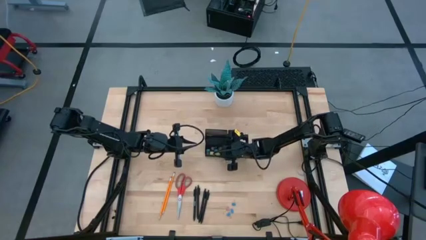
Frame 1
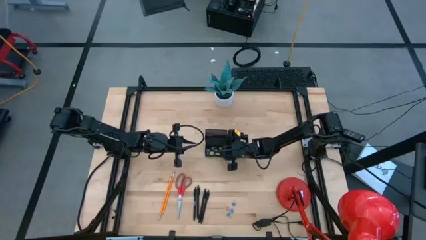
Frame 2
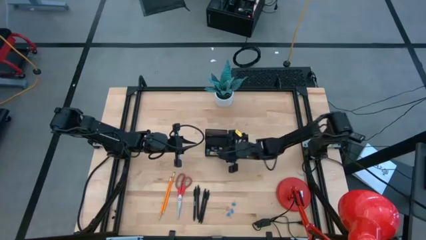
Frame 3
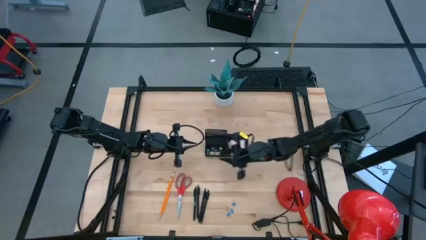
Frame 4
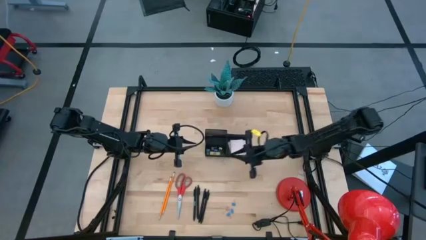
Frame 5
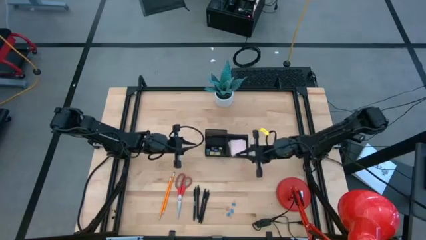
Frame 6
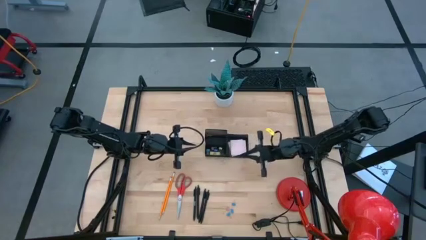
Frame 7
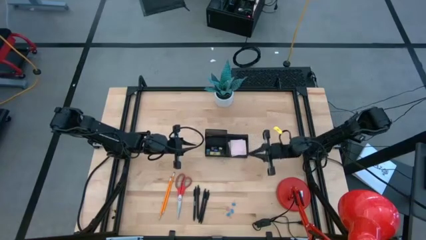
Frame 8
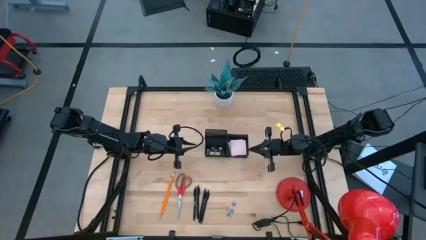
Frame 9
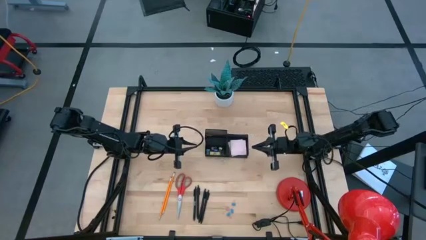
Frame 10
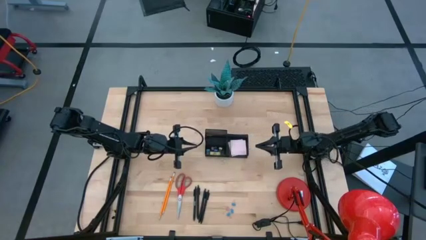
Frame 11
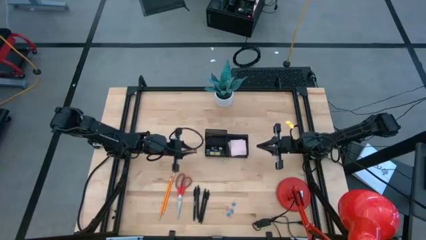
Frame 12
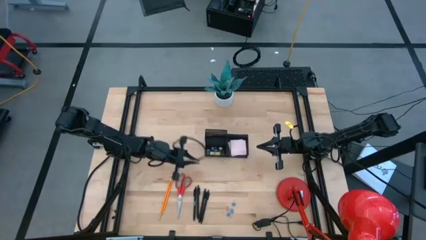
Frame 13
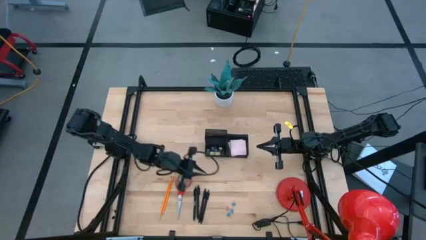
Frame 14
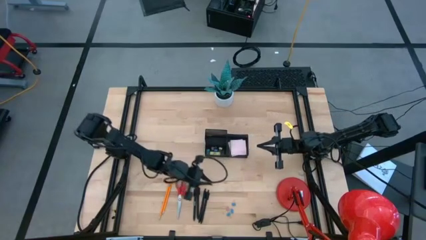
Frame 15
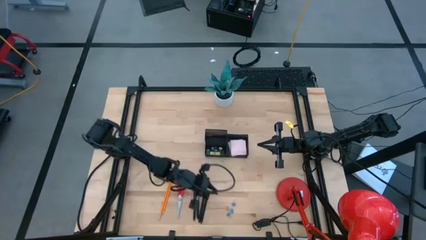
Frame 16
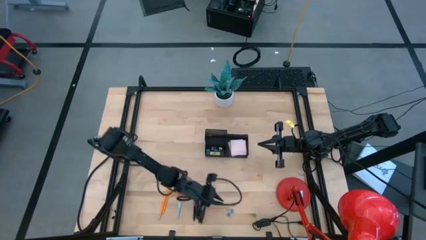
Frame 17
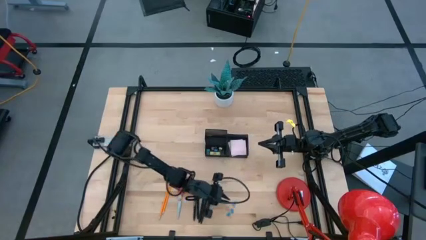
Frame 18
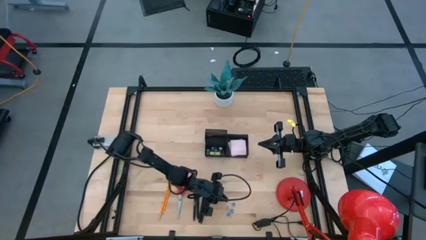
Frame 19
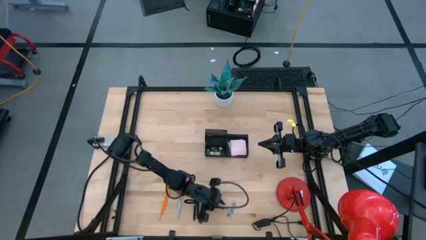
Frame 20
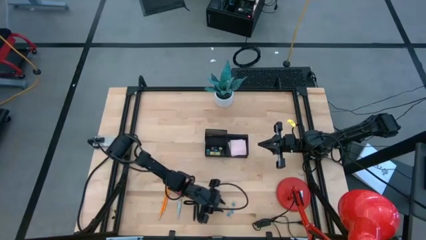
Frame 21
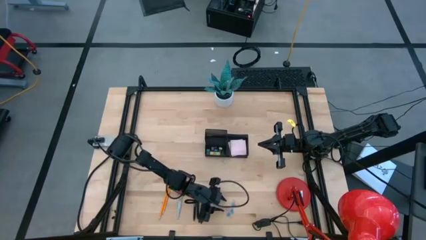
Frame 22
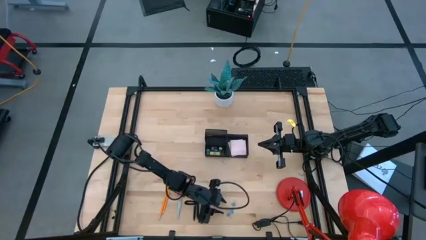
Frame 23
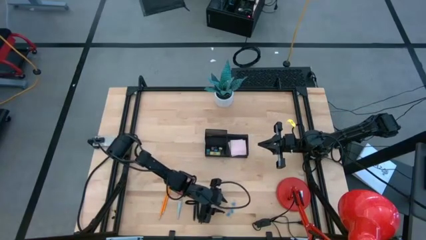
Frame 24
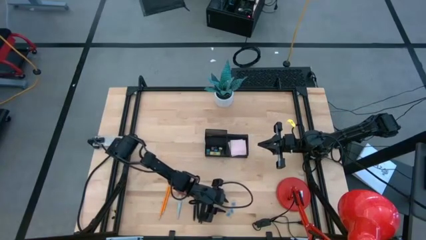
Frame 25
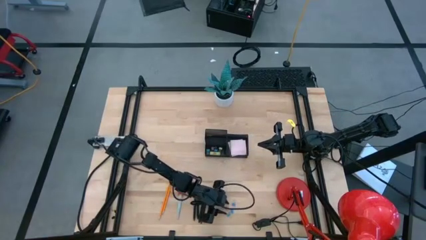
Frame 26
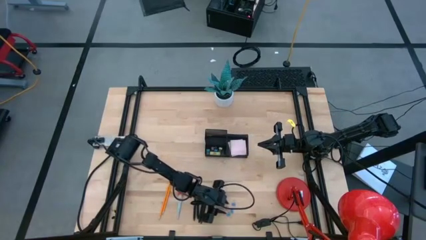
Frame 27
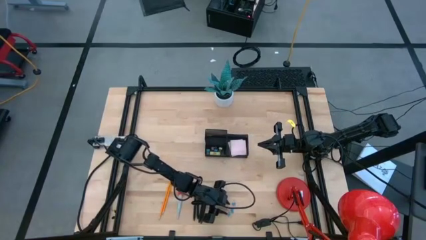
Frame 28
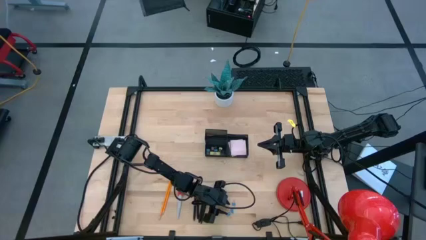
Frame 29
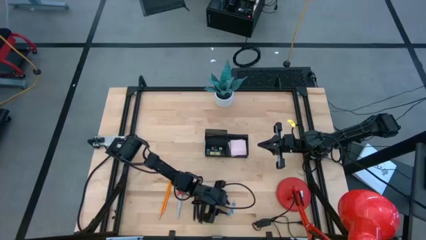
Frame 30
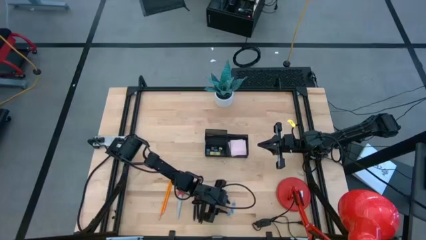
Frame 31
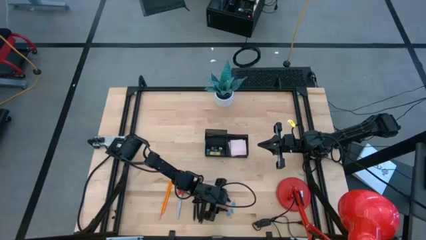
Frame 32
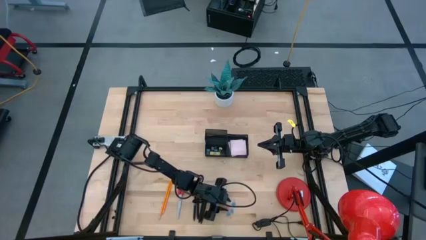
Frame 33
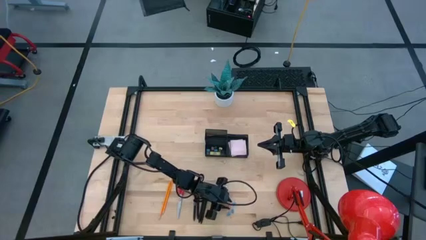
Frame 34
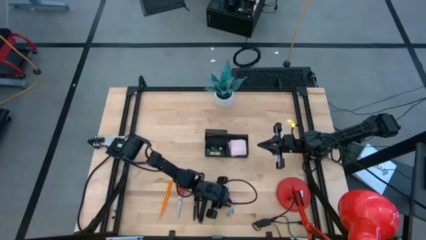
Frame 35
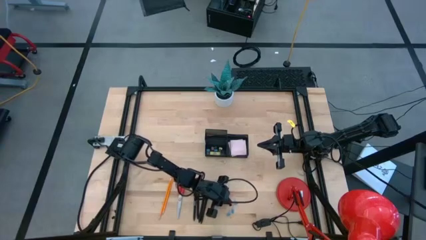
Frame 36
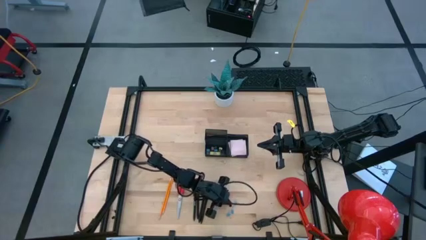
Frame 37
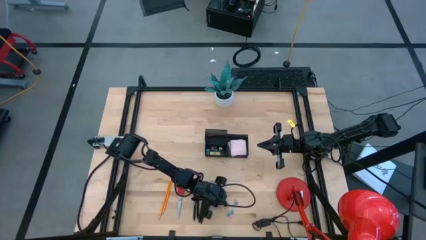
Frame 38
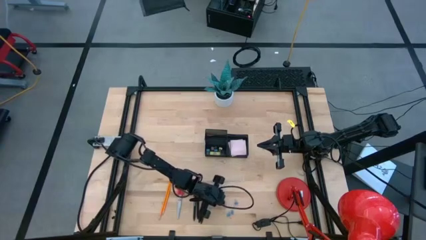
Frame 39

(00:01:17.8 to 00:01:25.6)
Task: Pick and place office supplies into organizer
Put the pink binder clip into the black desk organizer

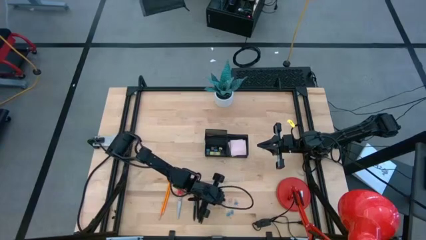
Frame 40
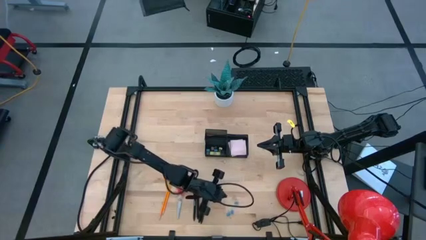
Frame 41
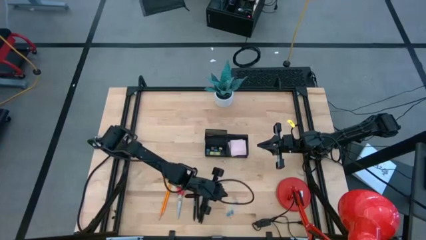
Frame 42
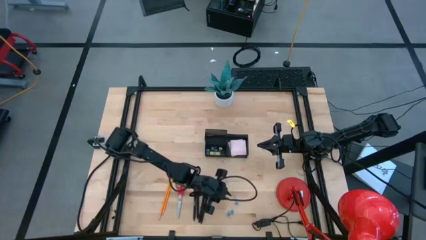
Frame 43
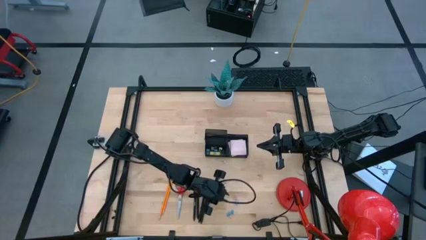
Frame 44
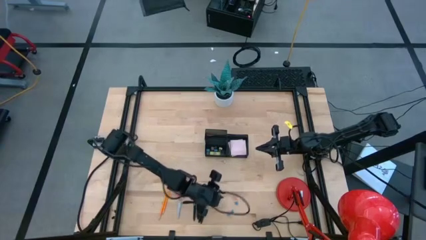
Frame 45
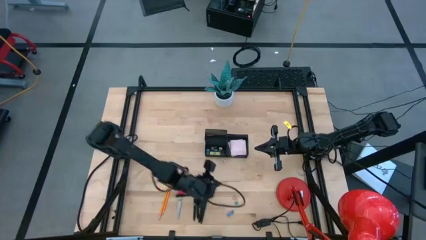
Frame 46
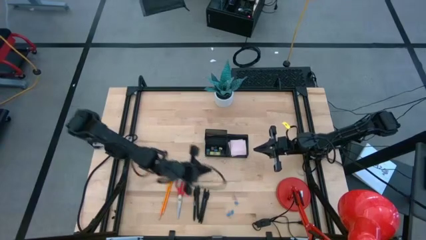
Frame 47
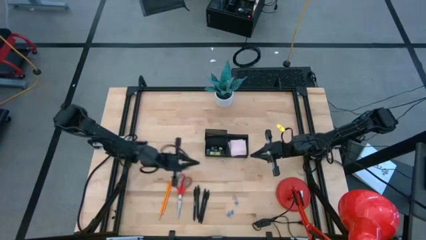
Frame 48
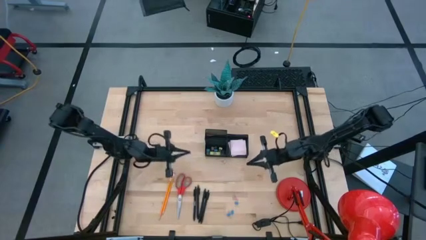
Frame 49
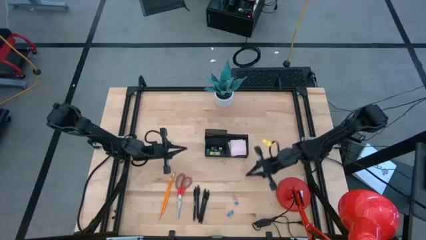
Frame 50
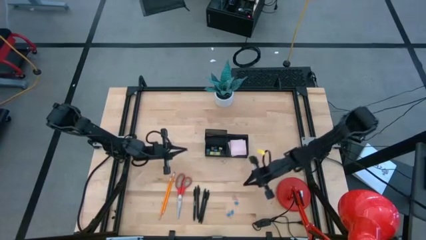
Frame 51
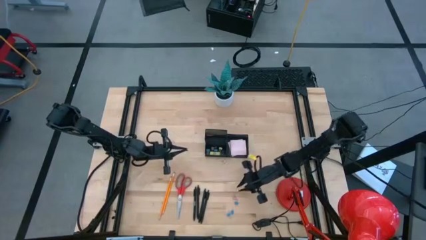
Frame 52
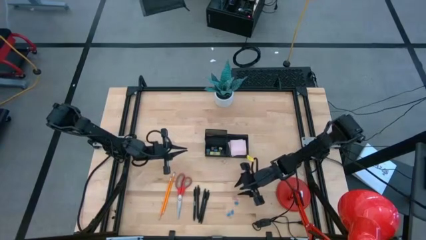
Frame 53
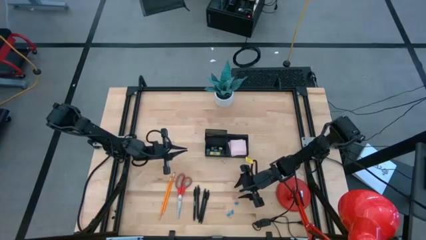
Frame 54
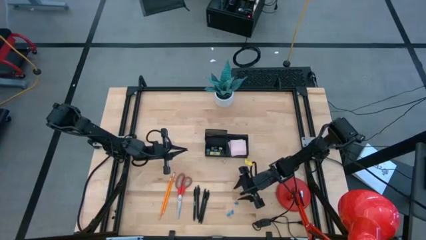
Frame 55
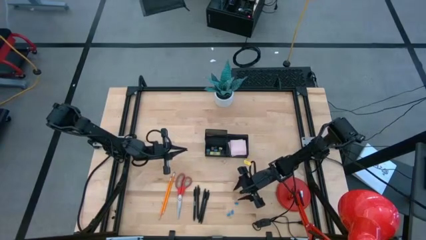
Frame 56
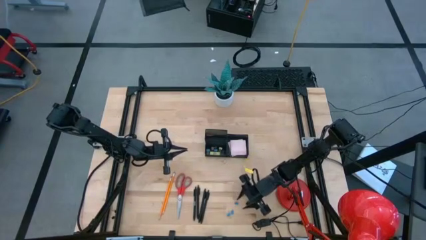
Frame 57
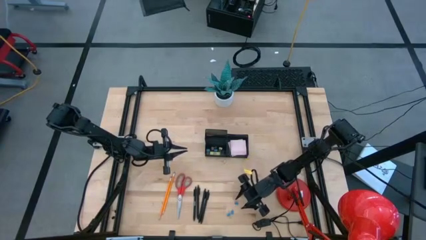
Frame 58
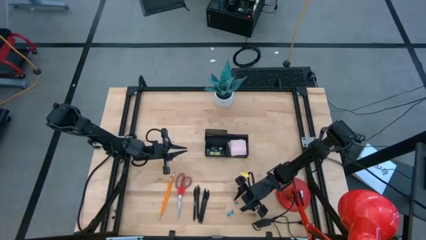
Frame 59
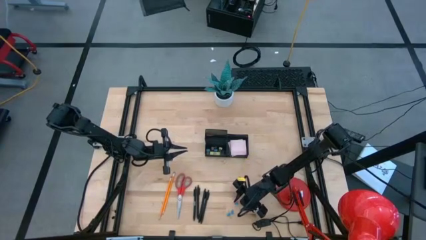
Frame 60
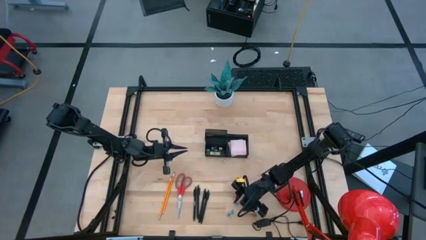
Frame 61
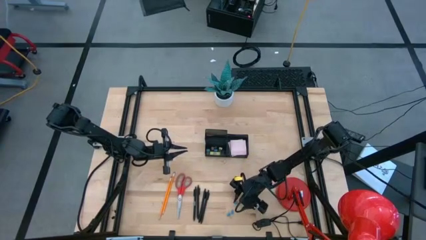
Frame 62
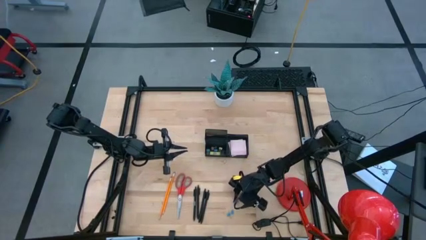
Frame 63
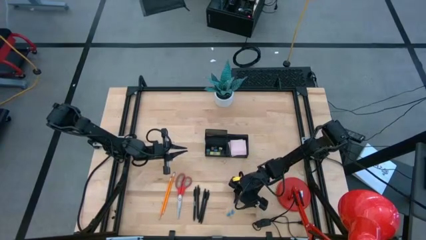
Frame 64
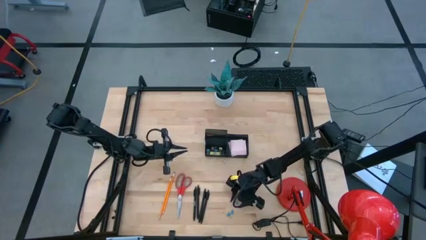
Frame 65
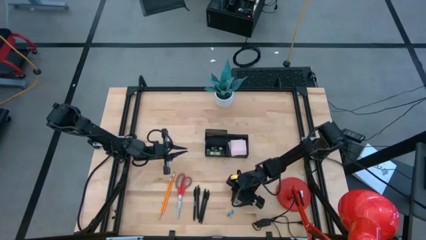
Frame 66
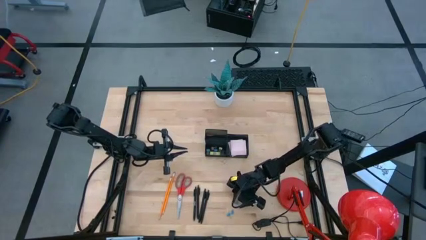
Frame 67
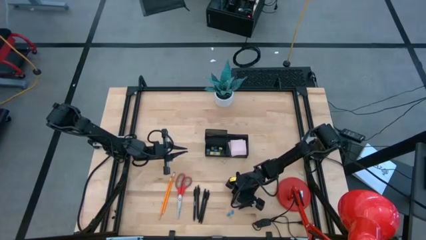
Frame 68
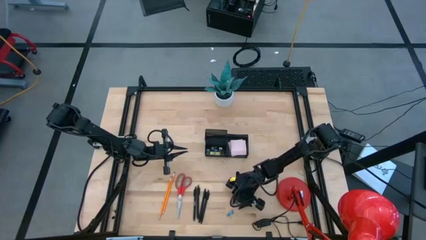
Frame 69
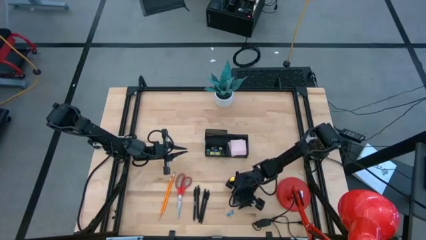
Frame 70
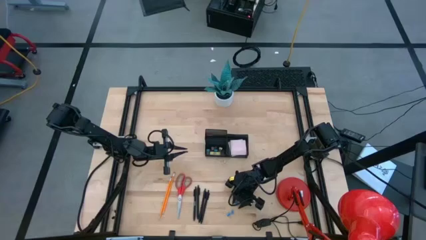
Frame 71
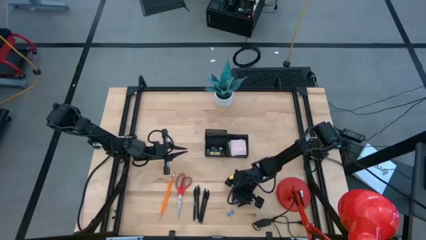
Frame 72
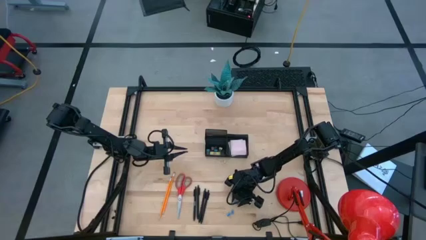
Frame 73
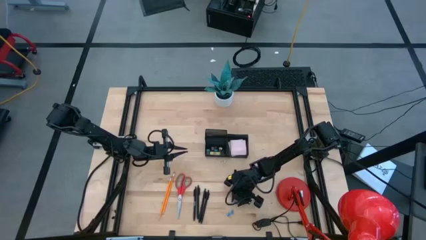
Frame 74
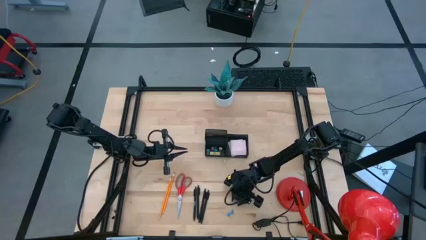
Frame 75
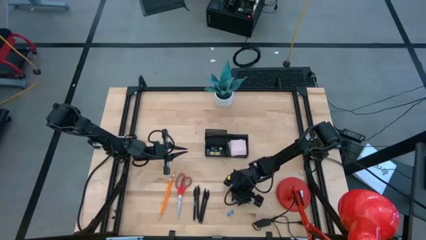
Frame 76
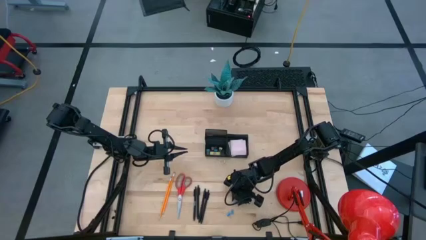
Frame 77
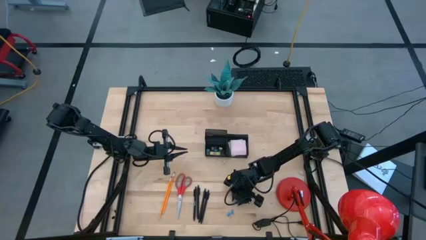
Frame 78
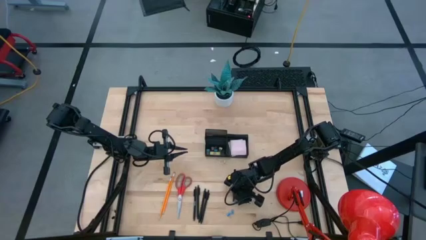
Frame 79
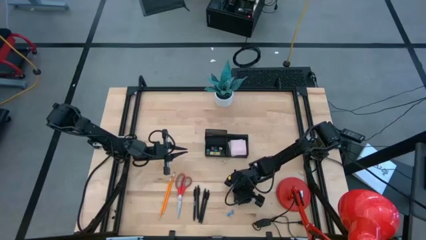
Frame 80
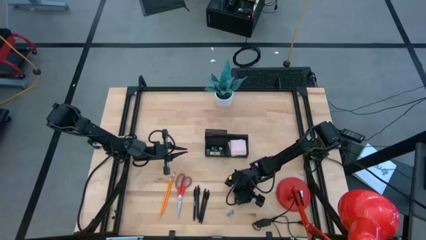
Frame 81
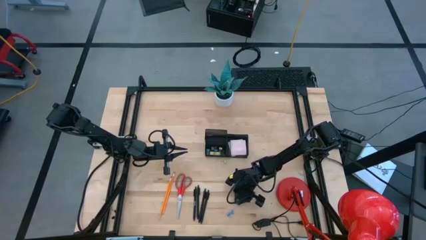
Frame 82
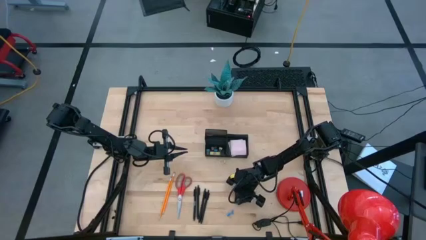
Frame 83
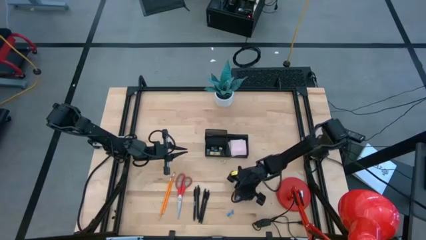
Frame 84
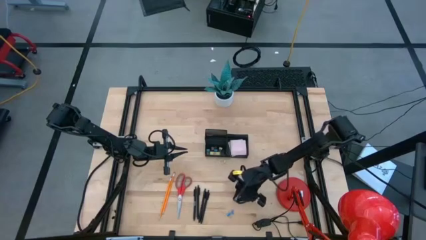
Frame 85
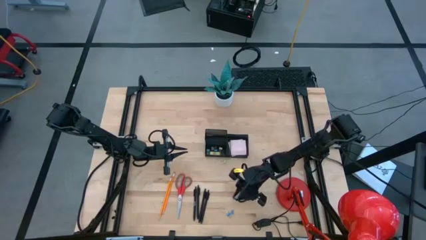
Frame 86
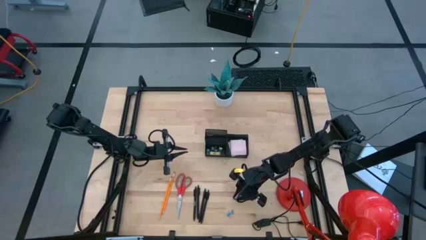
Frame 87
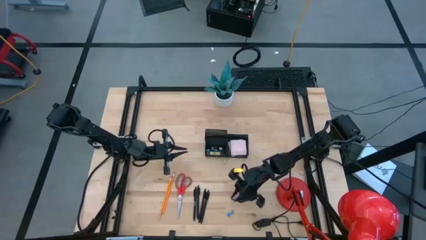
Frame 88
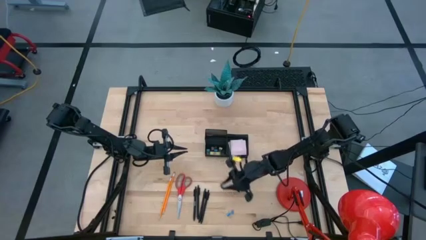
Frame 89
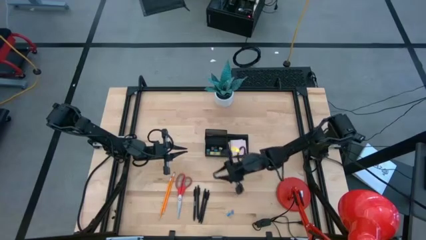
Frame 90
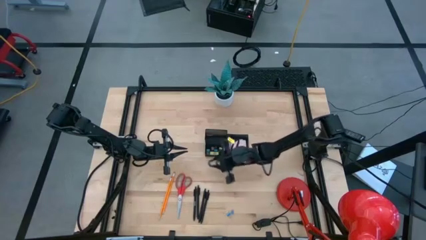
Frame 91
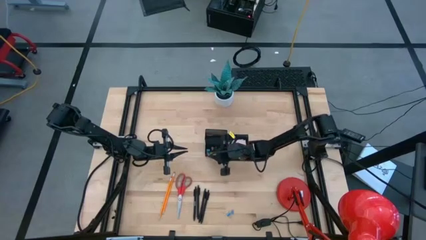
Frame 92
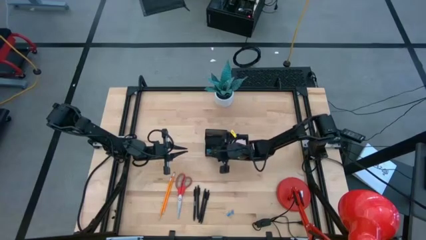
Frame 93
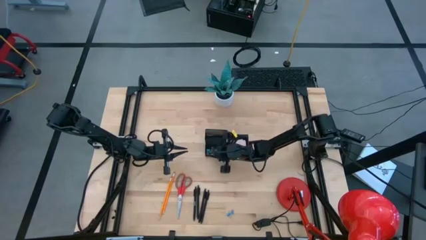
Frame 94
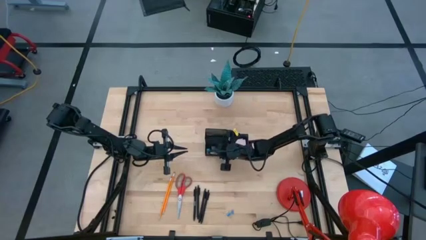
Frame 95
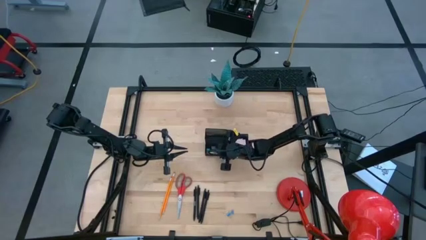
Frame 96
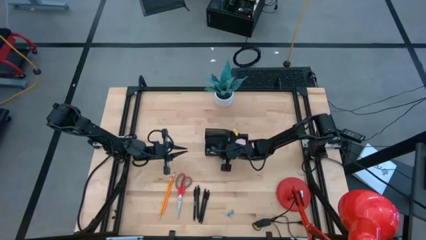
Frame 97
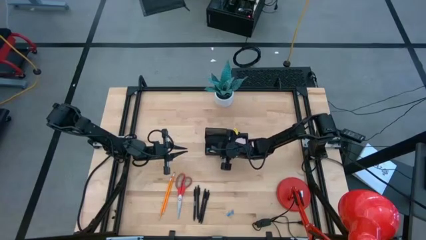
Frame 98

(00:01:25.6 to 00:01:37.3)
Put the blue binder clip into the black desk organizer
